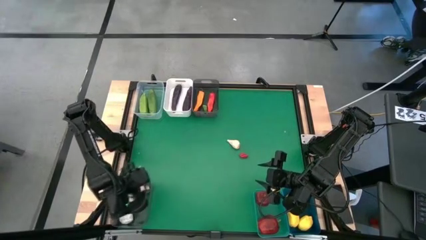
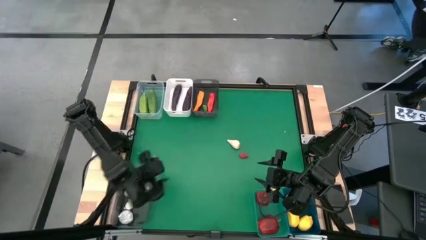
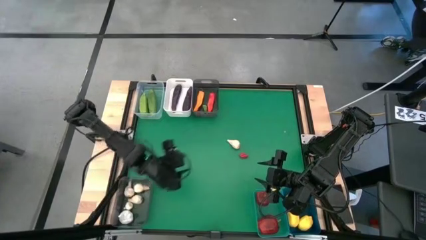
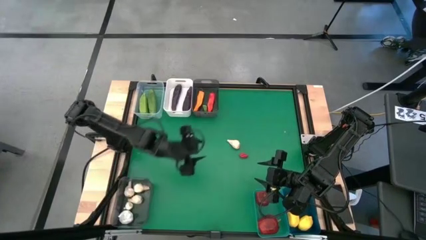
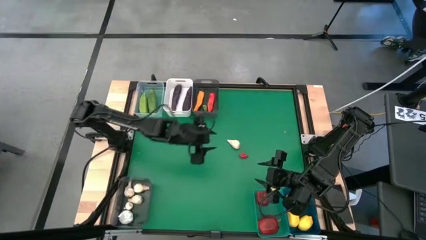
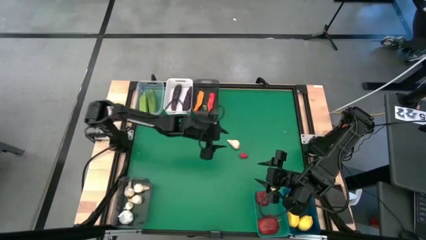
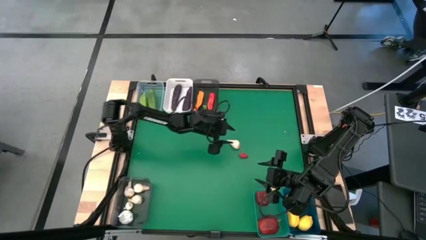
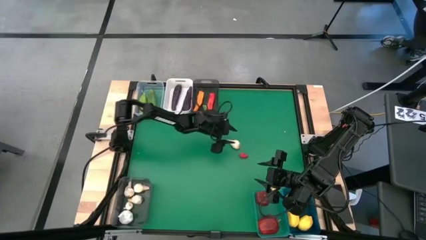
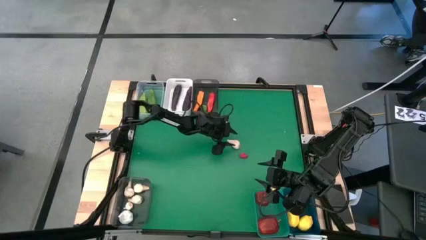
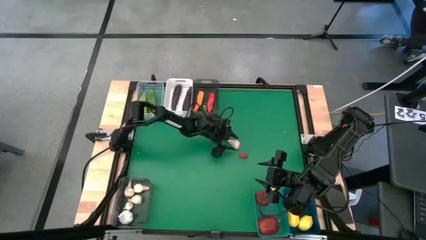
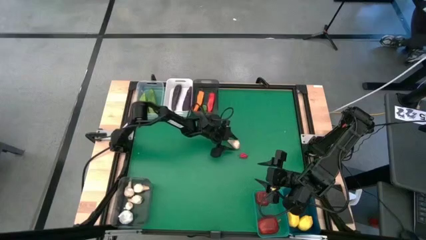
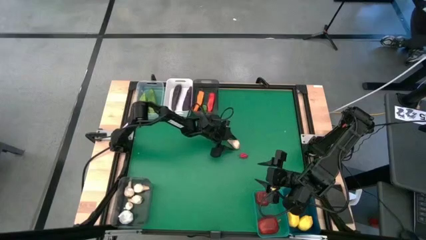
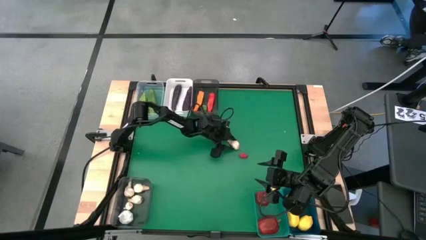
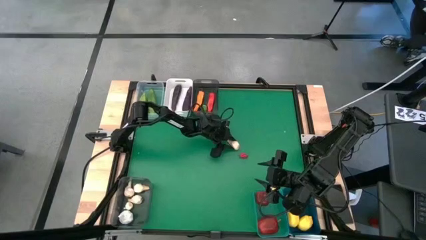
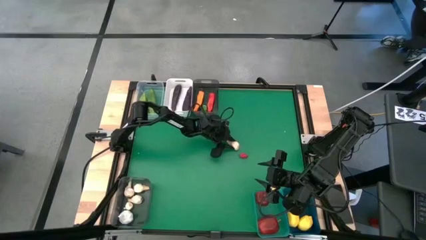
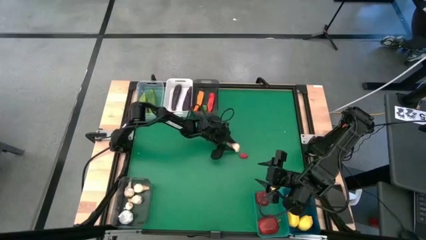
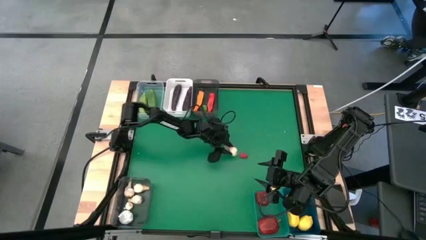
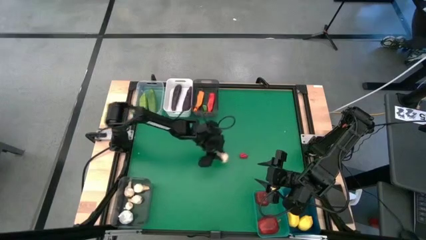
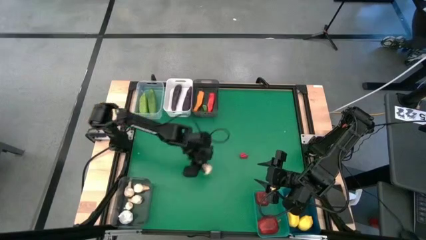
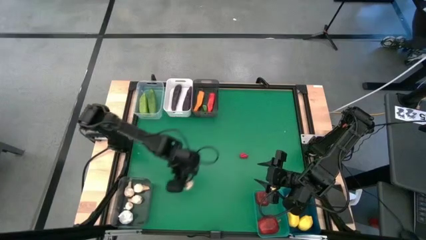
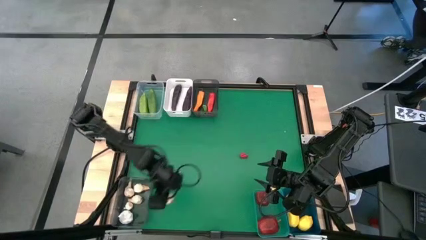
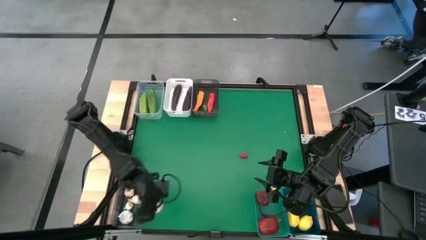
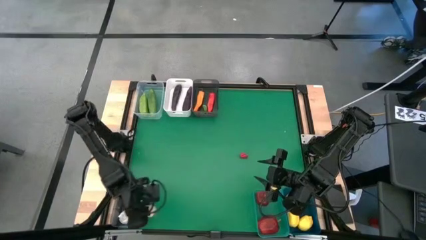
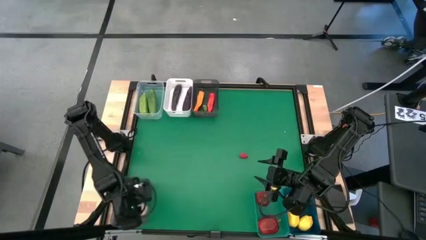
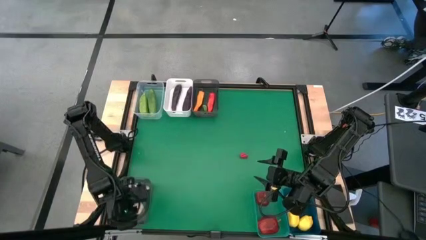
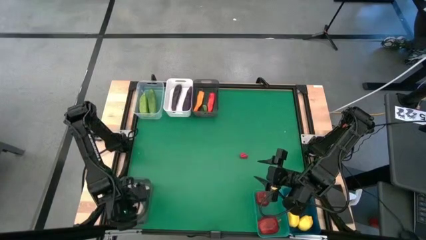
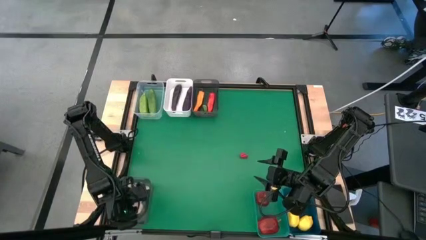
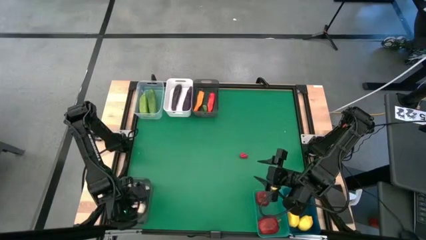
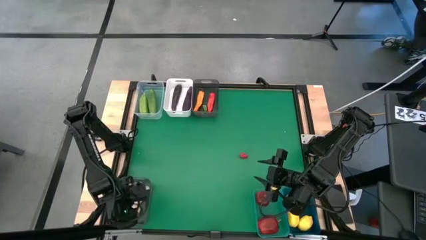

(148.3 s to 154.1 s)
Task: Sort produce into baskets
Put the white garlic into the bottom black bin

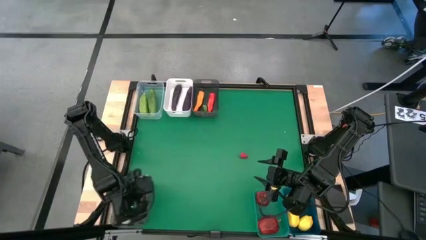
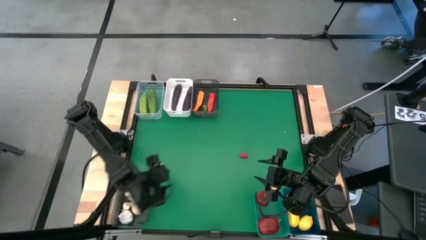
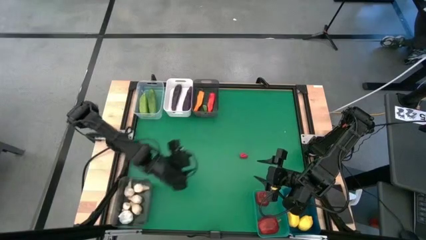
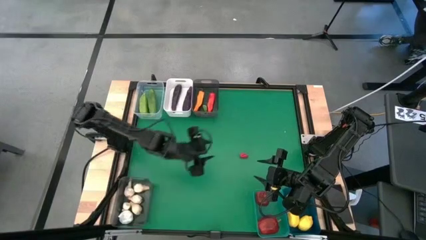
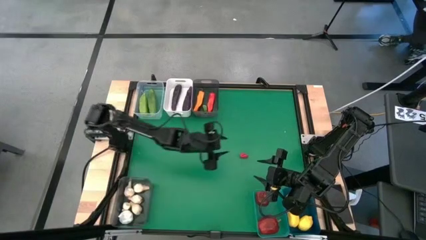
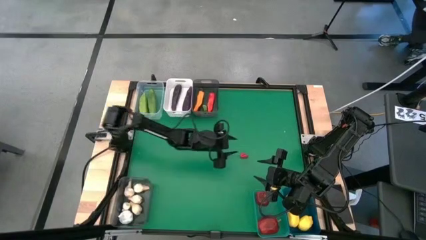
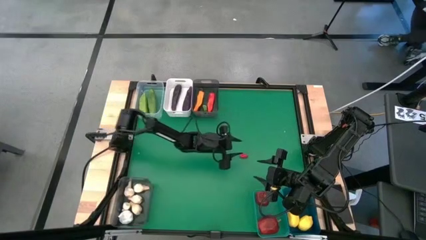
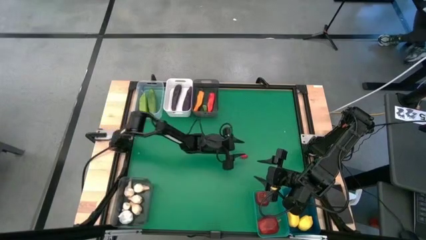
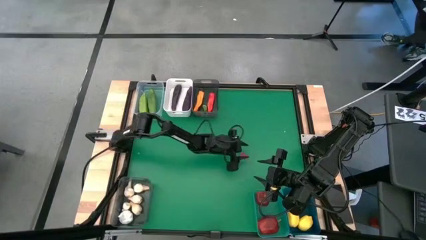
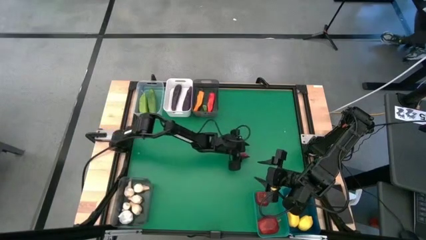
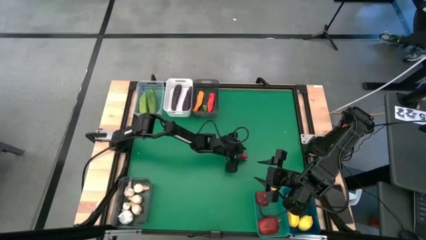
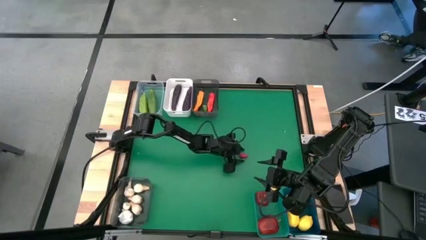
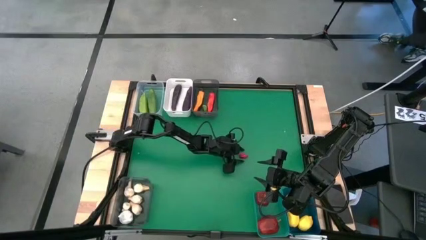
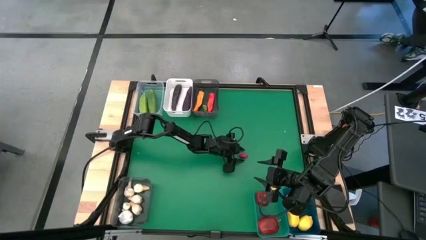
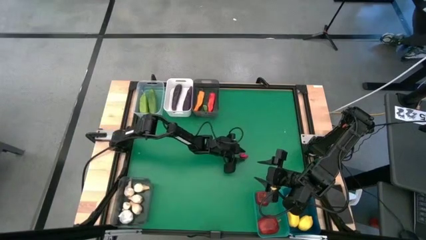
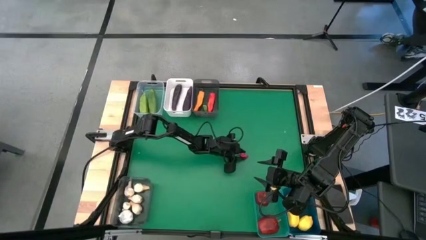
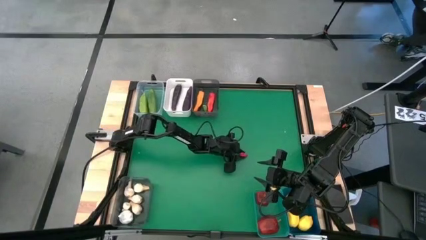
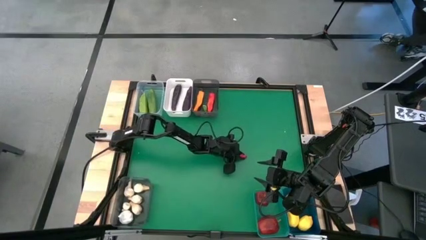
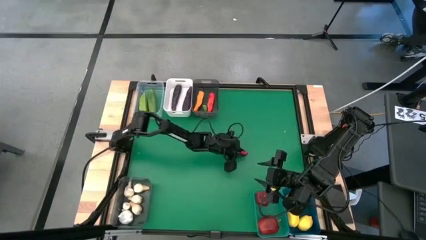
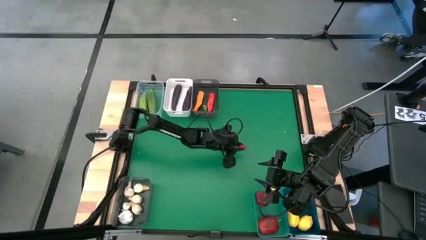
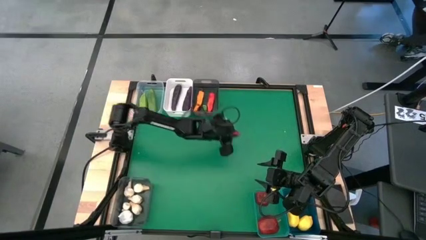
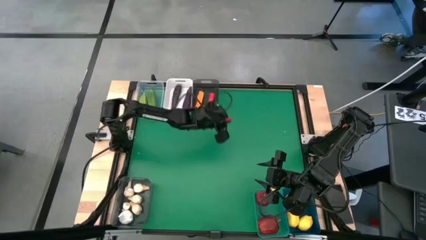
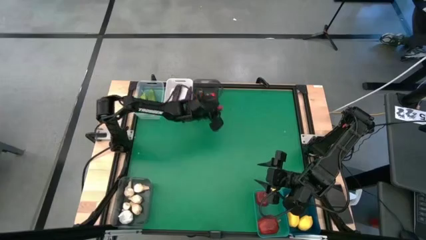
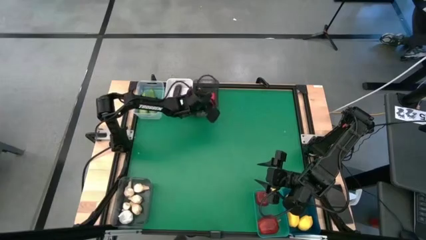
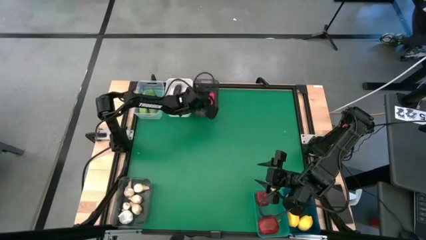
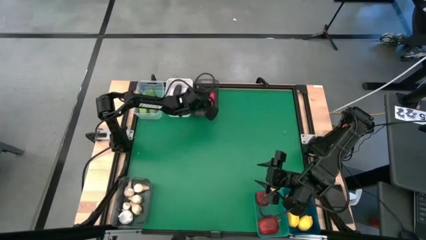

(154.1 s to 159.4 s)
Put the red chili pepper into the top black bin
